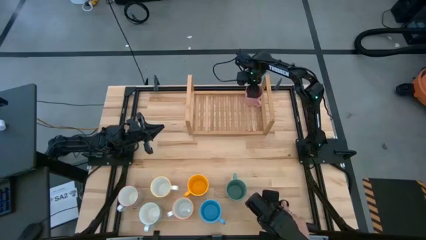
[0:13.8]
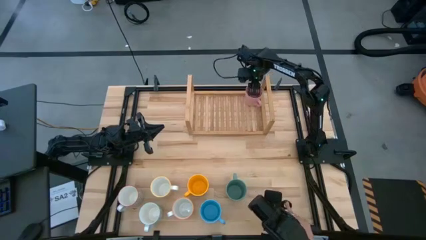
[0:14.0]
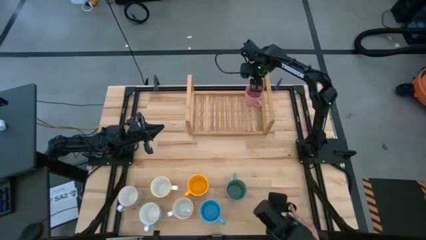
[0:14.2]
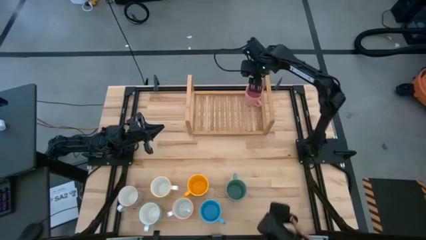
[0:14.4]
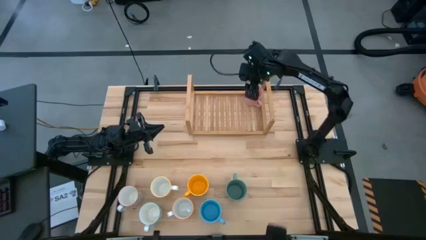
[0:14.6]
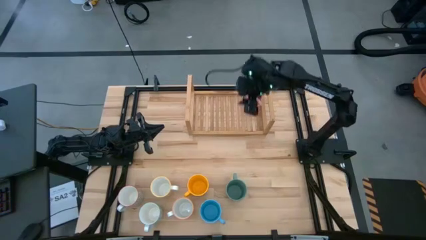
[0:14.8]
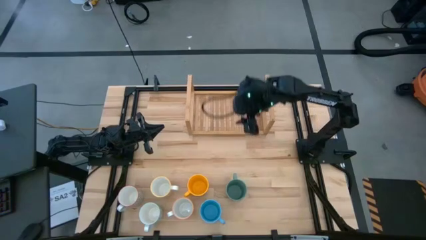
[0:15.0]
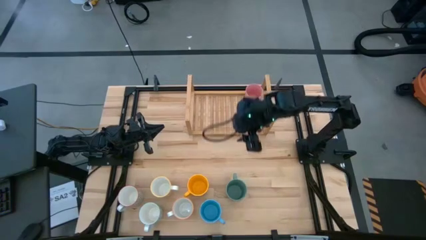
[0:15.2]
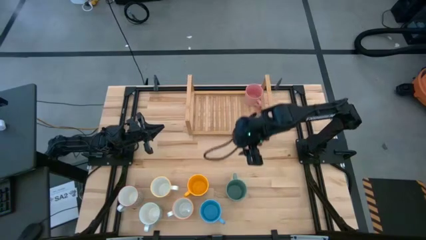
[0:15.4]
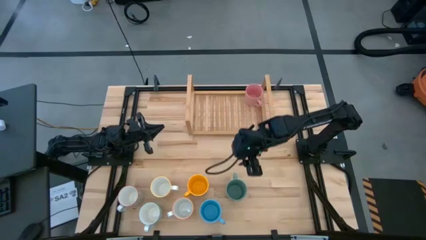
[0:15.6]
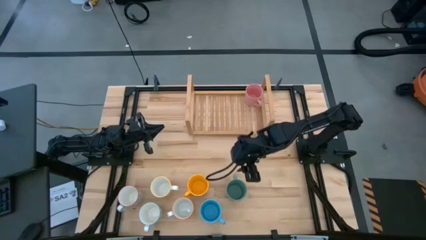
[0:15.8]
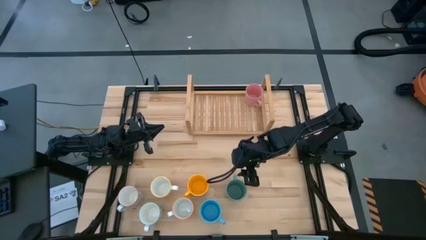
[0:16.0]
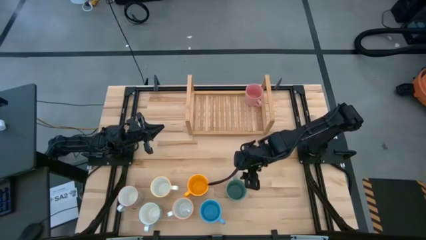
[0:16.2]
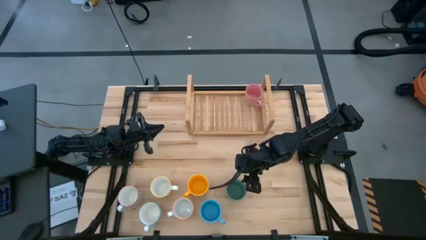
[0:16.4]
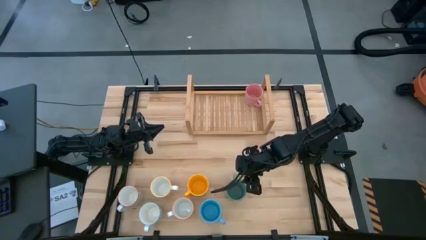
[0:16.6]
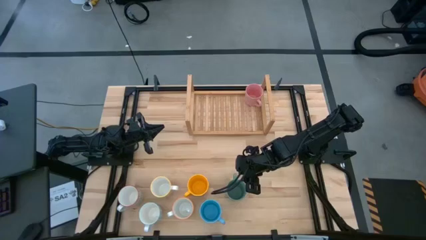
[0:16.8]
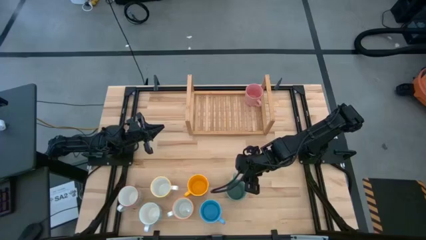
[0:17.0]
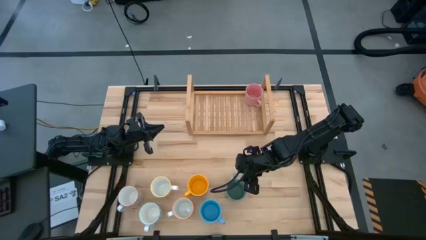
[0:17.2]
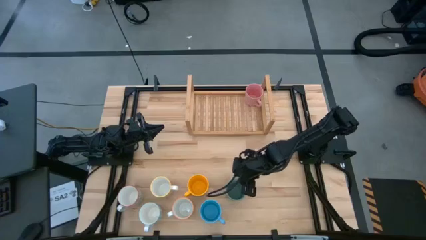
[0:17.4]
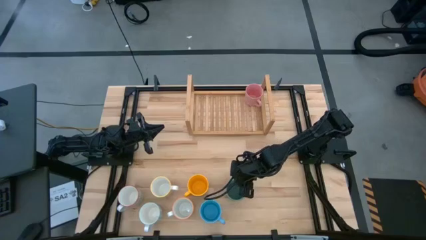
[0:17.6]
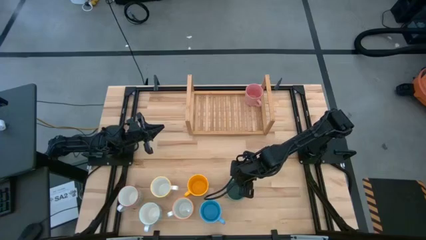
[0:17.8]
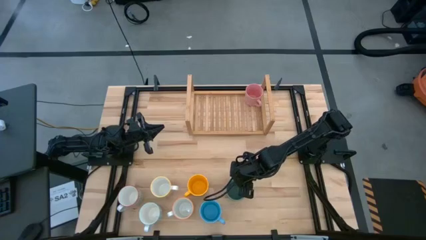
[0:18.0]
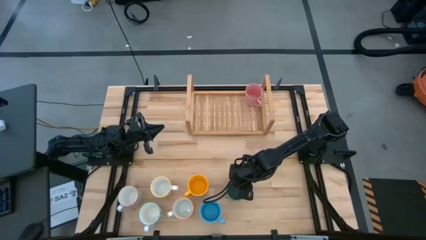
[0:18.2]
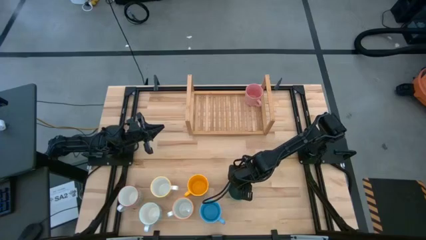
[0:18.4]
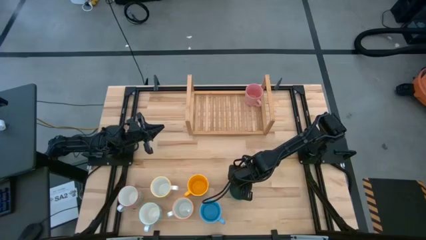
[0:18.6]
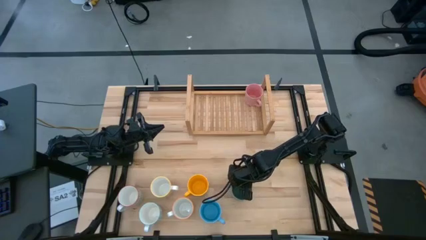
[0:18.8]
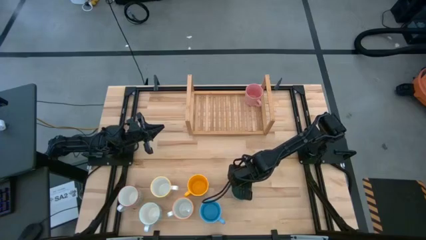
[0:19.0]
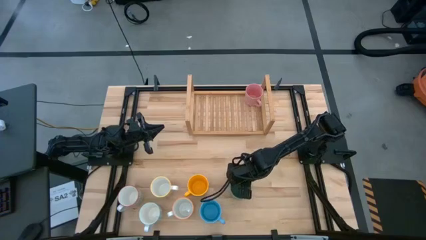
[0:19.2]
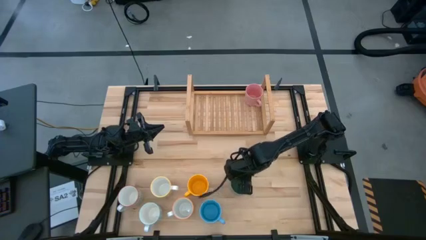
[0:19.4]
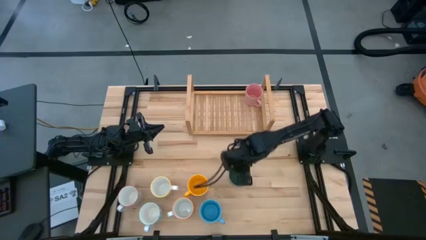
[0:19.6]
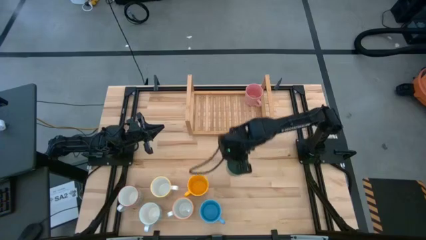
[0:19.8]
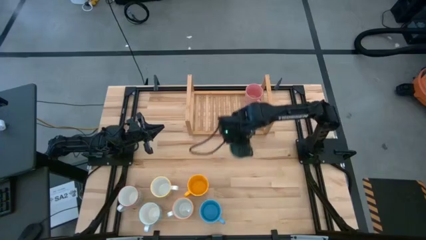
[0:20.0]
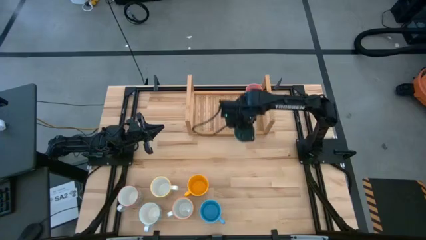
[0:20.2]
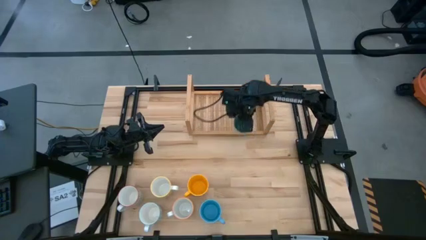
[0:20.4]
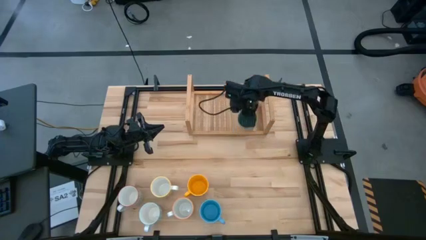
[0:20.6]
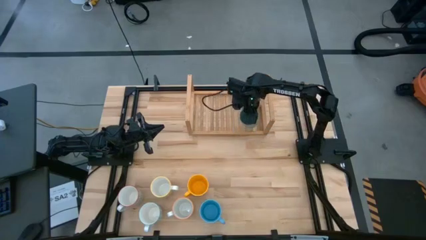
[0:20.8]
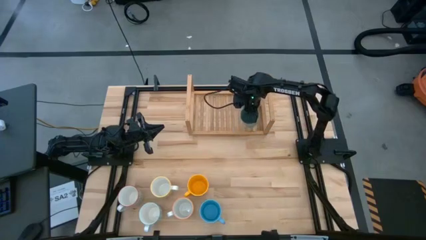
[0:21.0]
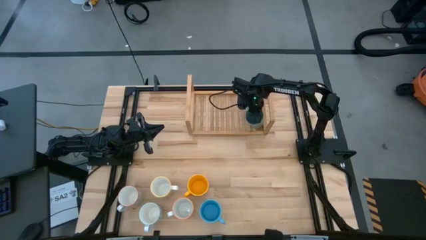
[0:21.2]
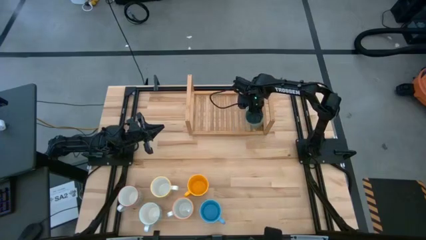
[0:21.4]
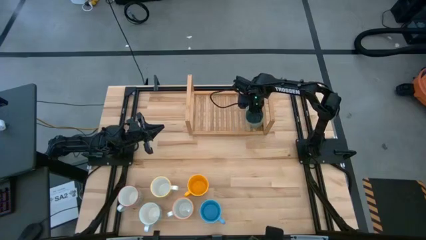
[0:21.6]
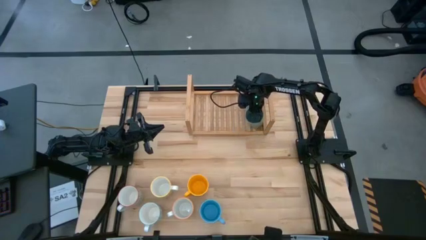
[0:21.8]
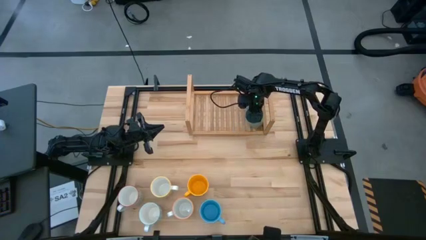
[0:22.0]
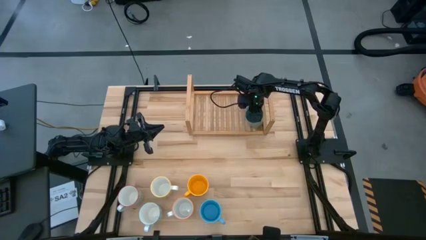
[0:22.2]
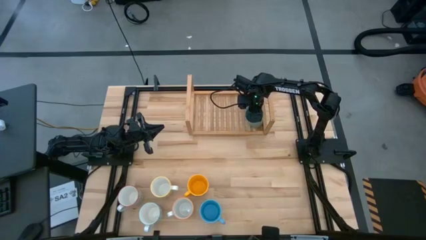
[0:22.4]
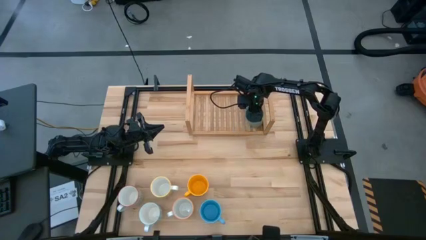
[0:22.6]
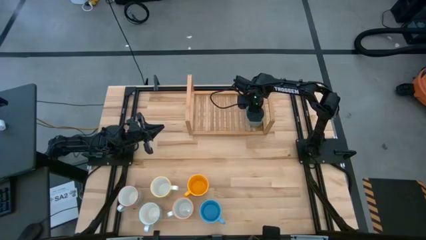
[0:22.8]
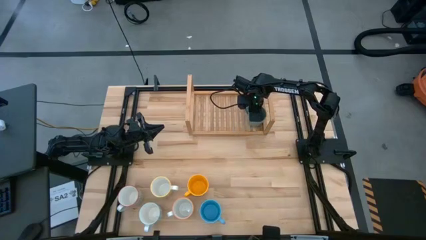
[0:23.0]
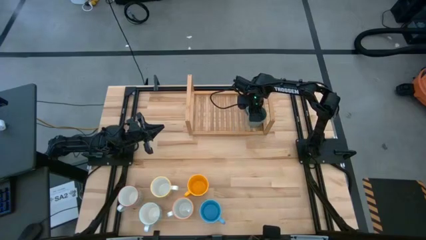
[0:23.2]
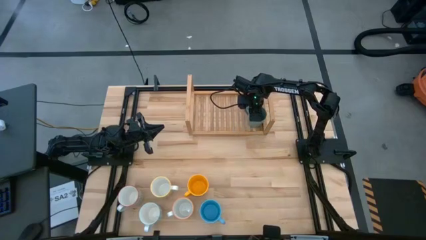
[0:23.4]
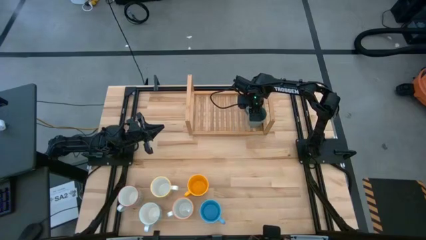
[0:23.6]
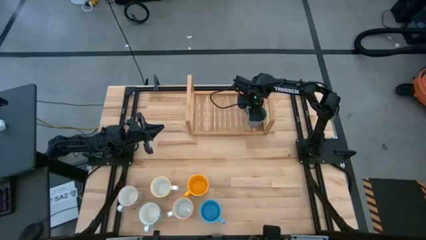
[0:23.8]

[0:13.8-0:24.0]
Task: Place coffee mugs
Put the green mug on the shelf

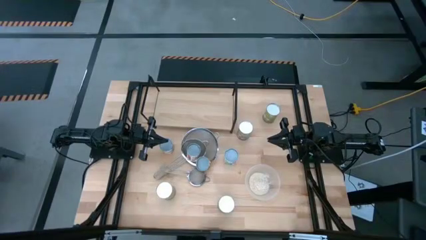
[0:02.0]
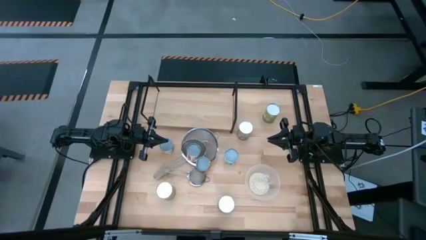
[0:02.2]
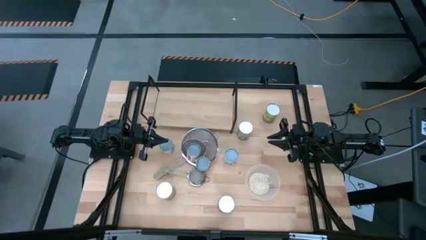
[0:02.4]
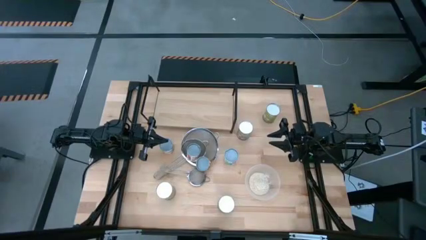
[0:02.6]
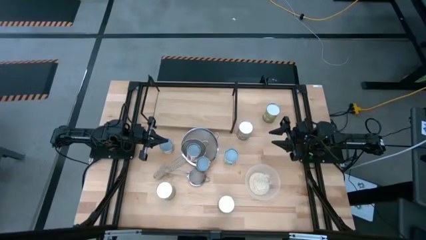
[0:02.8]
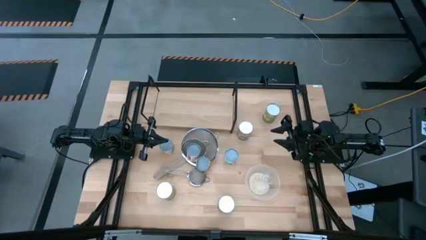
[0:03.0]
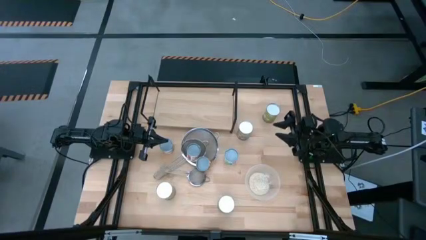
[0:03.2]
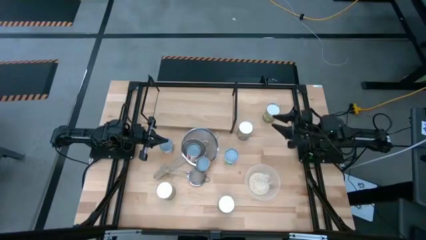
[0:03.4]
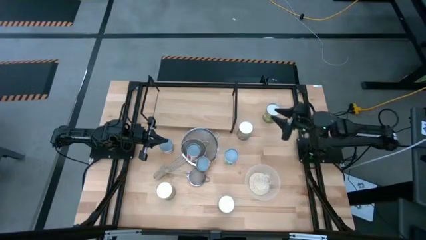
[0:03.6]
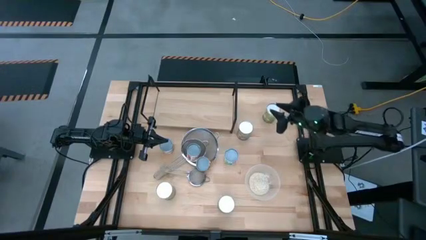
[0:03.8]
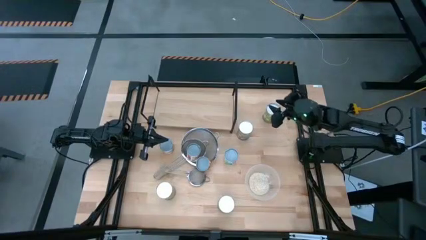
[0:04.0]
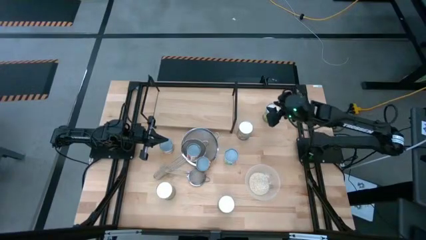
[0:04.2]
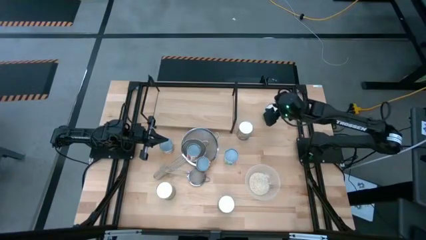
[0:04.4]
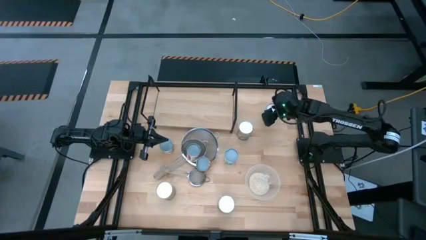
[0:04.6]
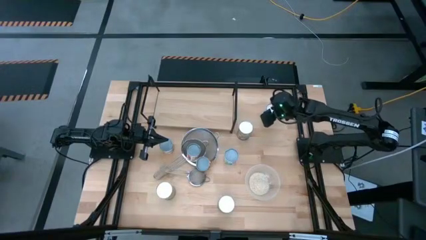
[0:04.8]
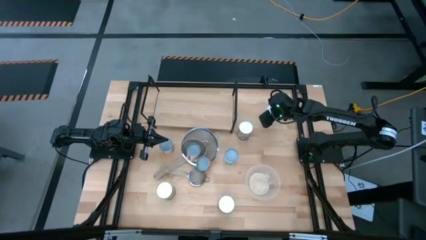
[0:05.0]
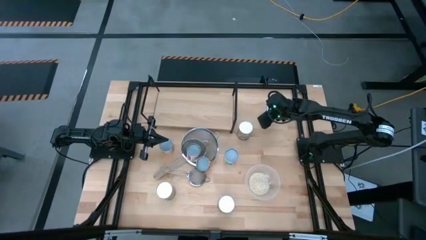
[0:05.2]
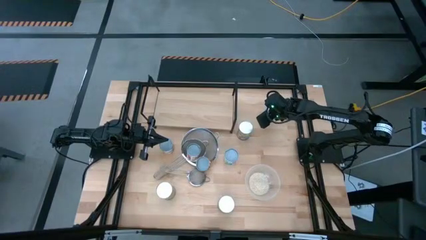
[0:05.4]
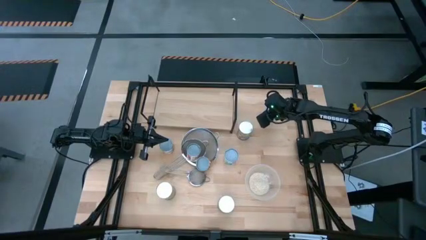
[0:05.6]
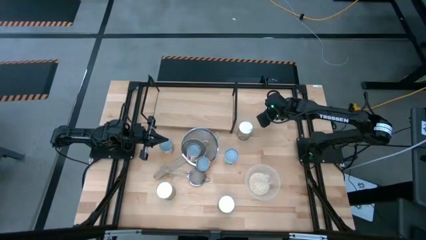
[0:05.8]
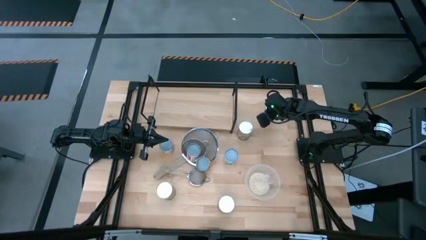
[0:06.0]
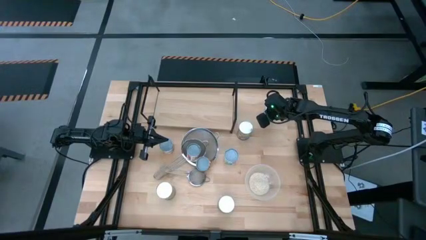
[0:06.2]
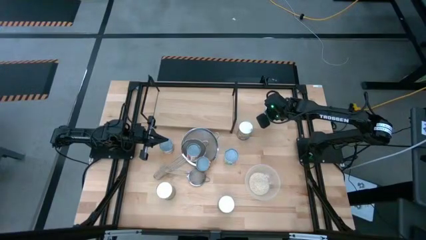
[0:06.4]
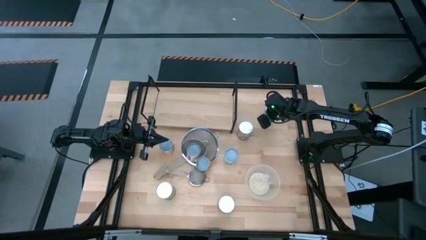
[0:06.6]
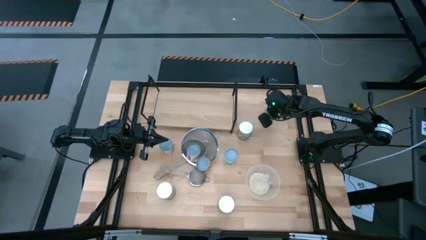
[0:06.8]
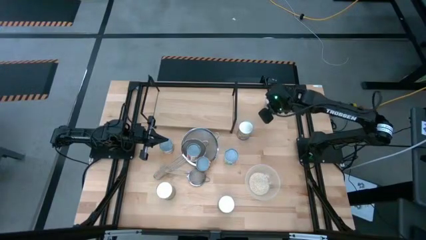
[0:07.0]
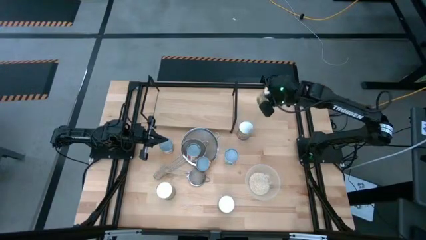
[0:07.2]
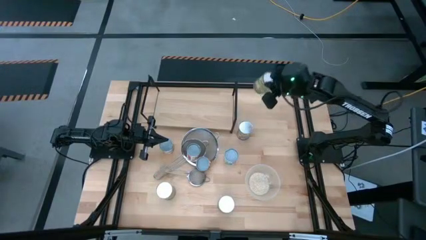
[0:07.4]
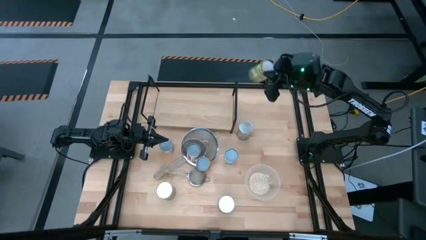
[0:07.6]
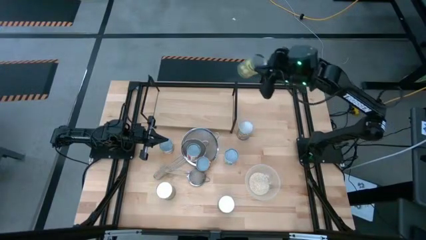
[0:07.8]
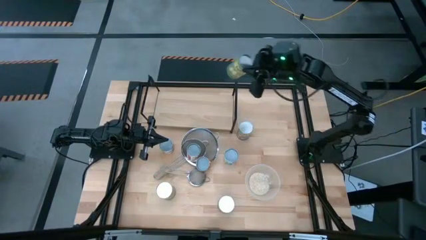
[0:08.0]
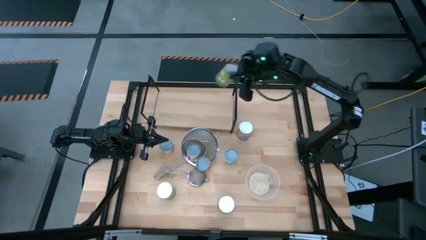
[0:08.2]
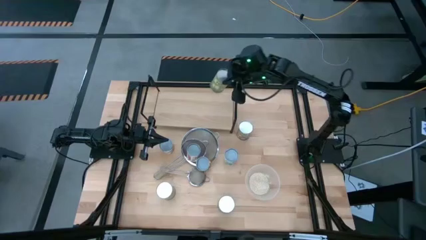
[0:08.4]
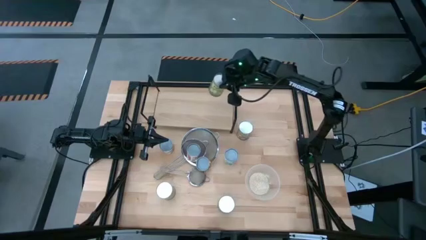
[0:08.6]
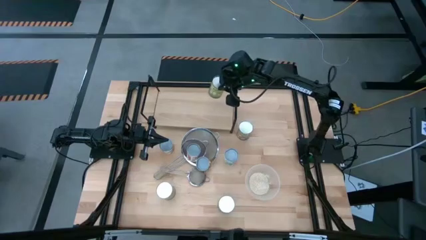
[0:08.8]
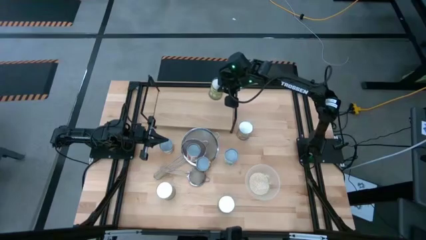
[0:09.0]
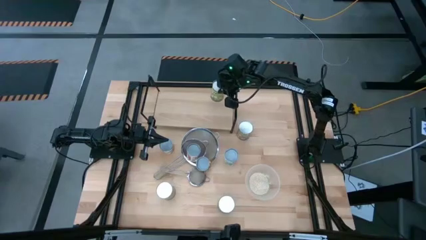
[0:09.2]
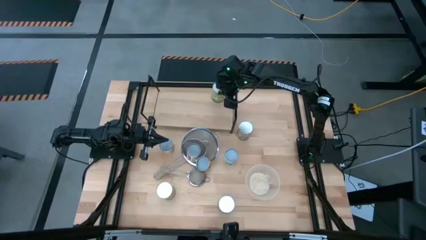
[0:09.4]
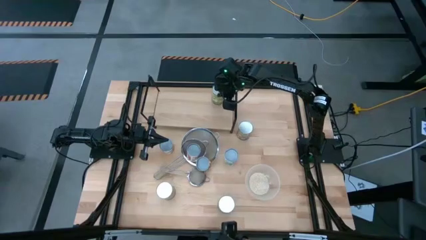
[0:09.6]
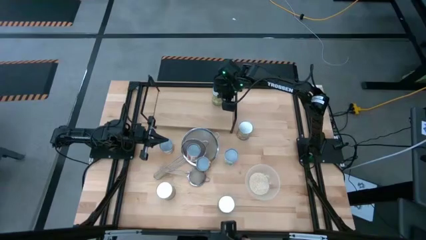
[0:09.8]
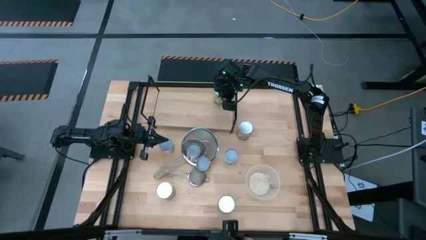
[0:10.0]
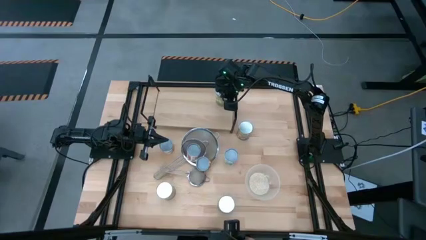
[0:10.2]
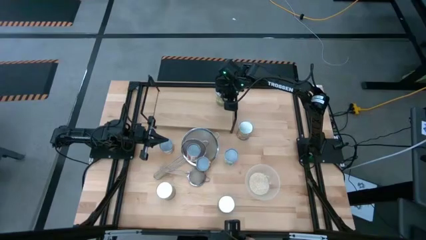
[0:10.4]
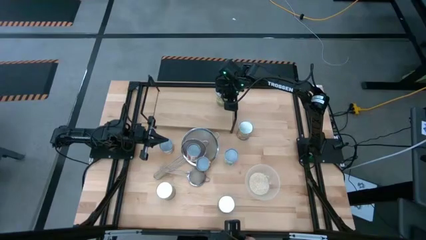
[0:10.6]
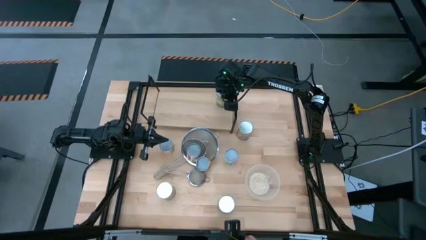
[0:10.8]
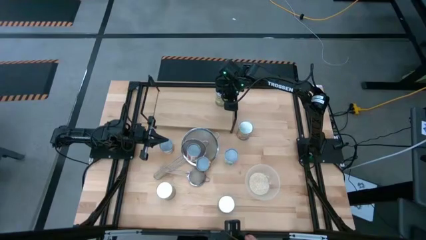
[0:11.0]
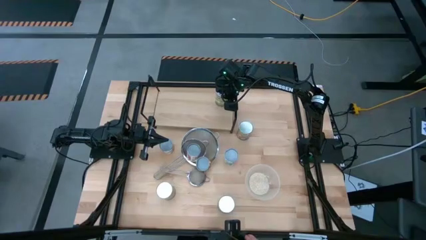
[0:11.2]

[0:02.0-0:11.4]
Task: Pick and place cans onto a shelf
Put the canned pears on the shelf
